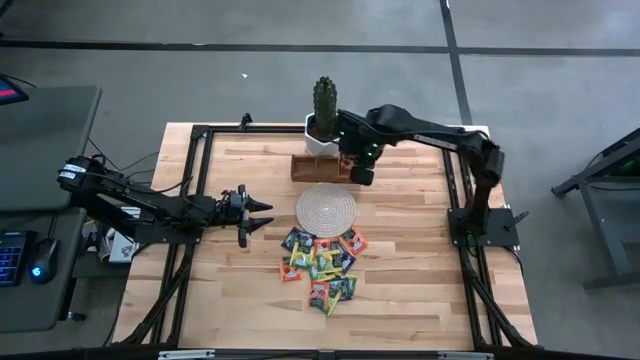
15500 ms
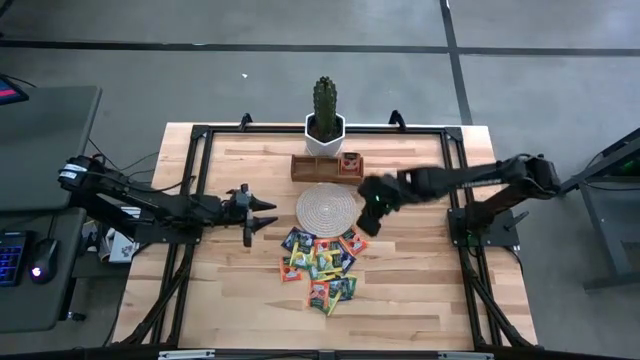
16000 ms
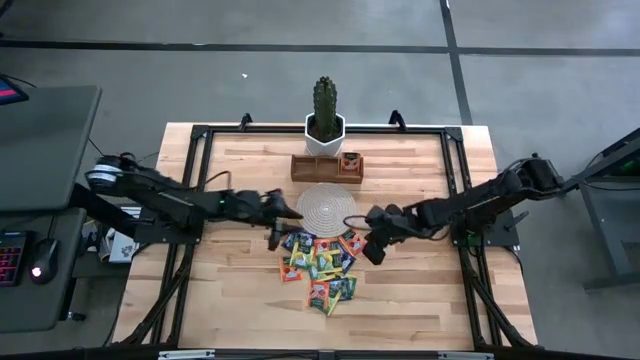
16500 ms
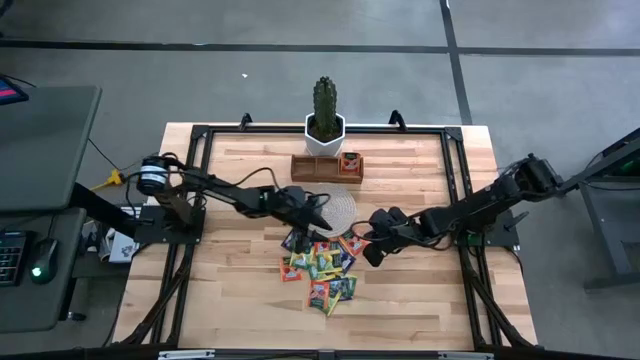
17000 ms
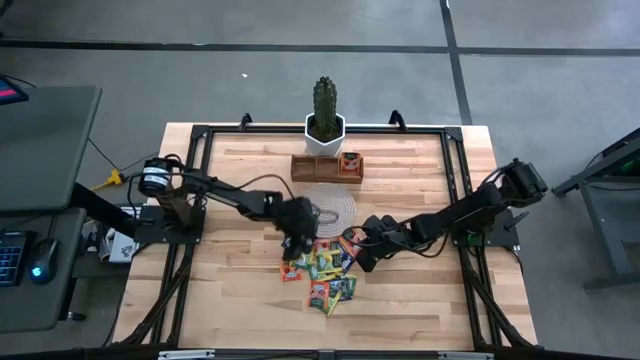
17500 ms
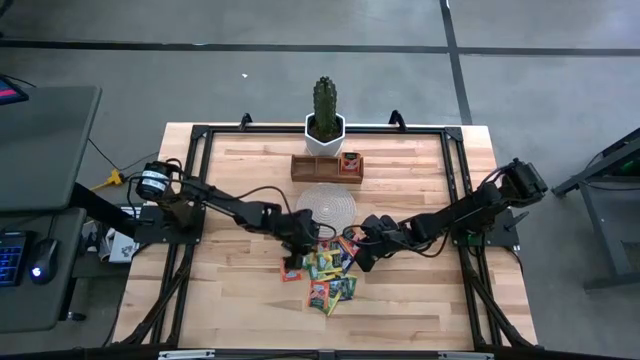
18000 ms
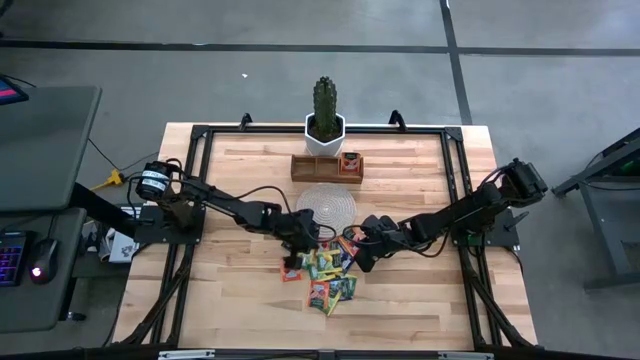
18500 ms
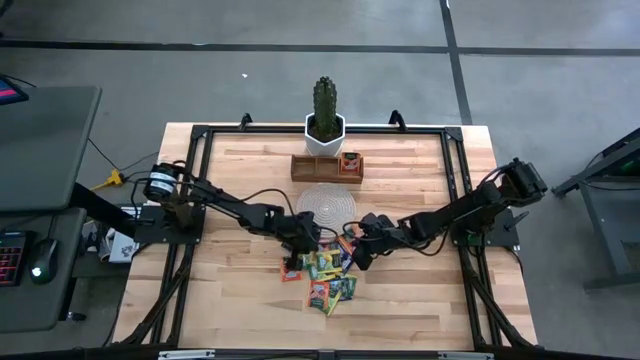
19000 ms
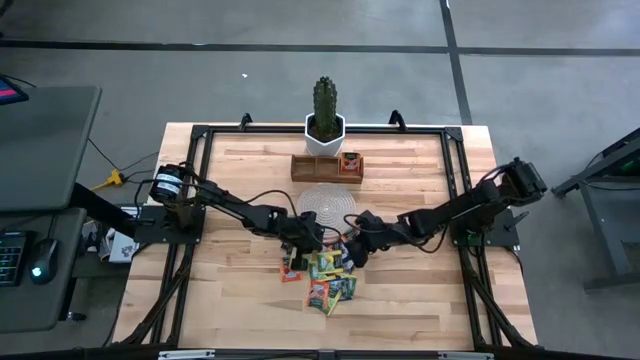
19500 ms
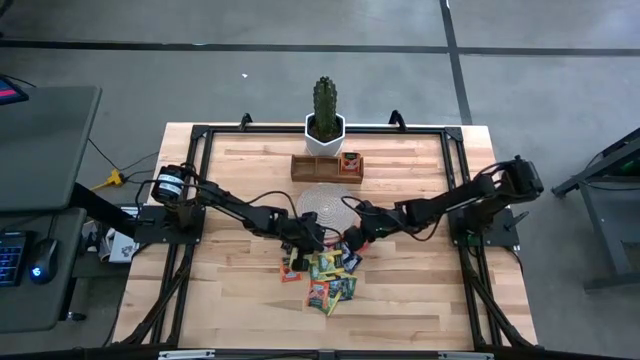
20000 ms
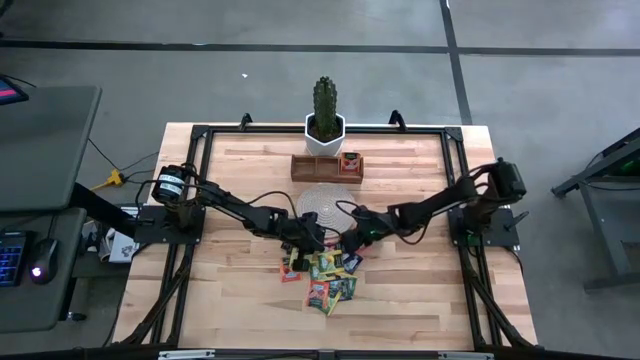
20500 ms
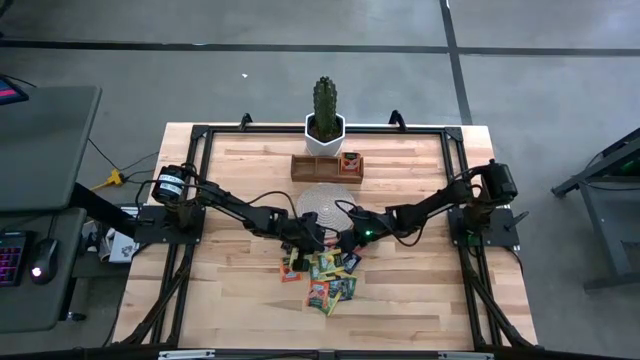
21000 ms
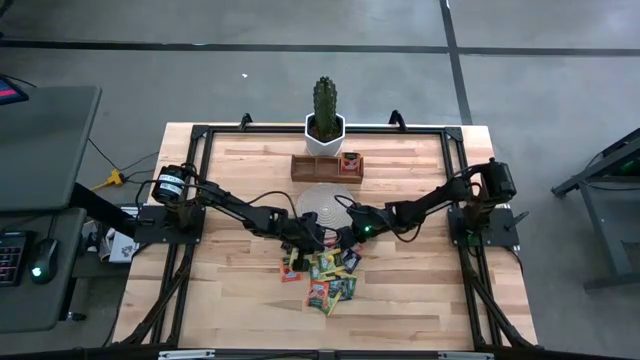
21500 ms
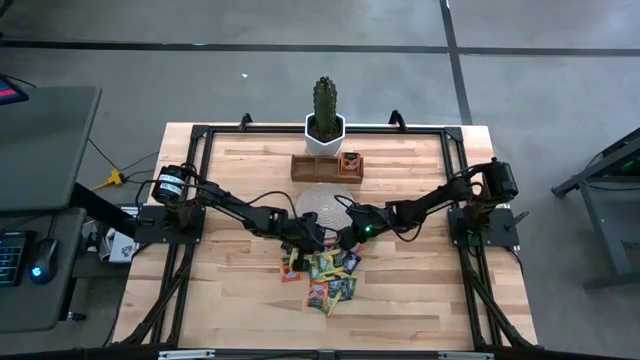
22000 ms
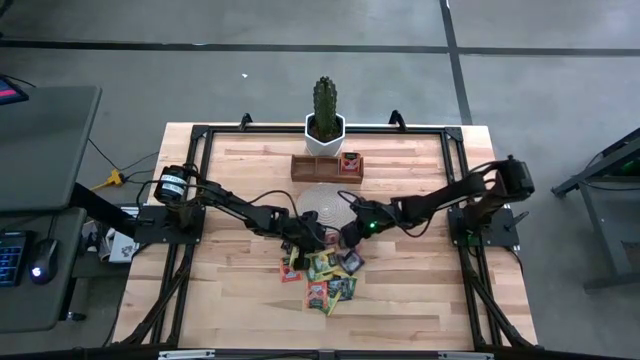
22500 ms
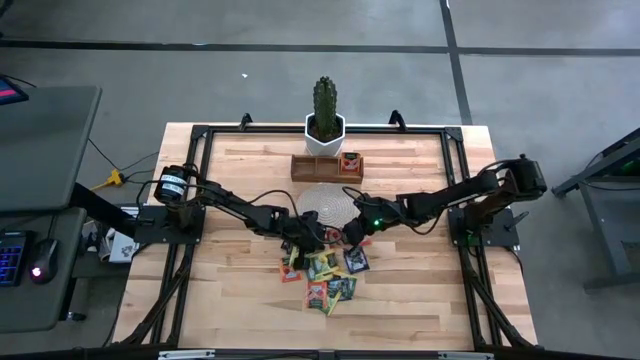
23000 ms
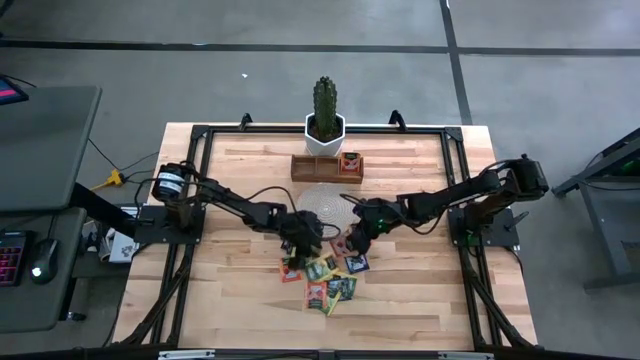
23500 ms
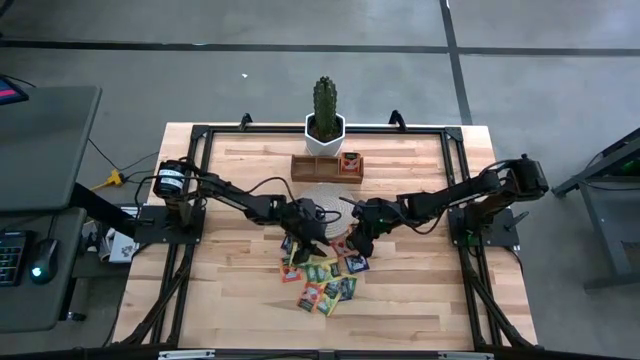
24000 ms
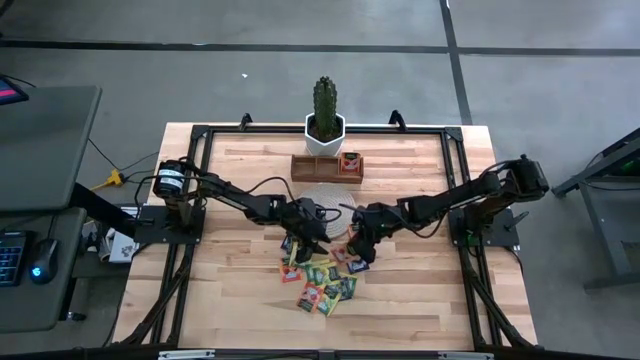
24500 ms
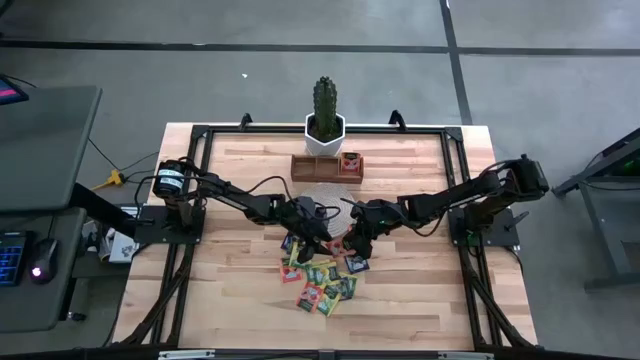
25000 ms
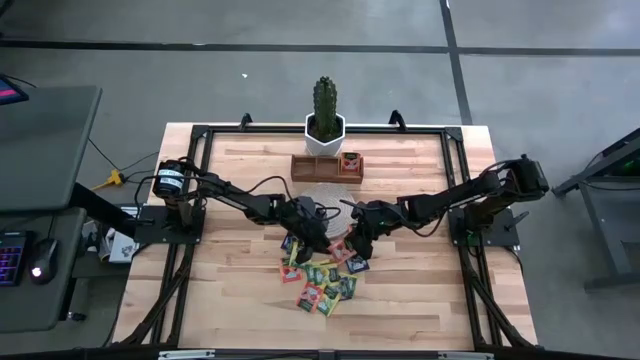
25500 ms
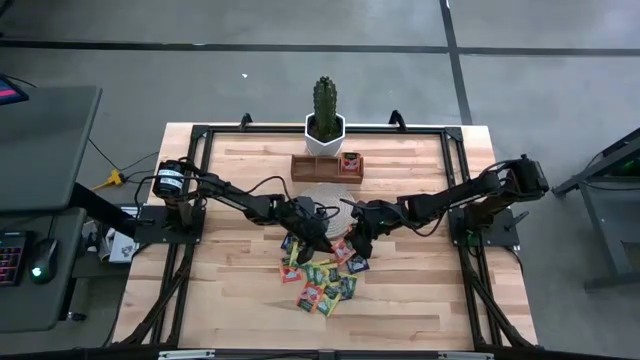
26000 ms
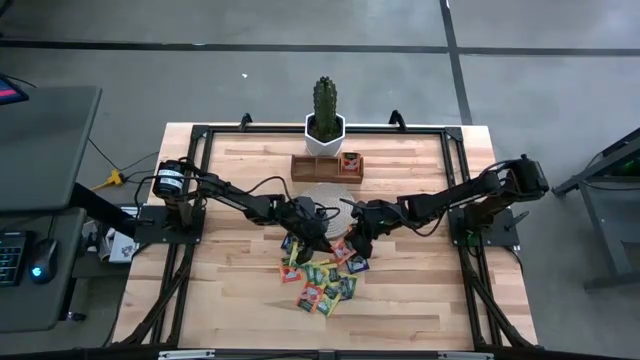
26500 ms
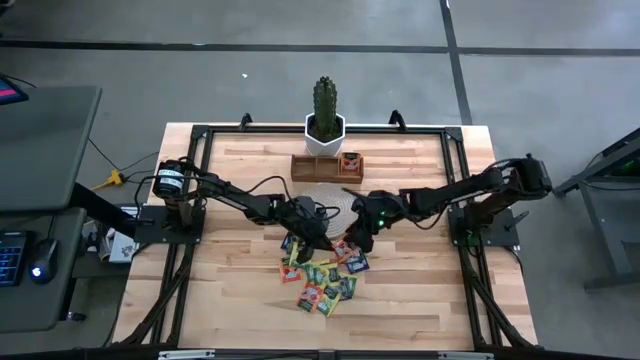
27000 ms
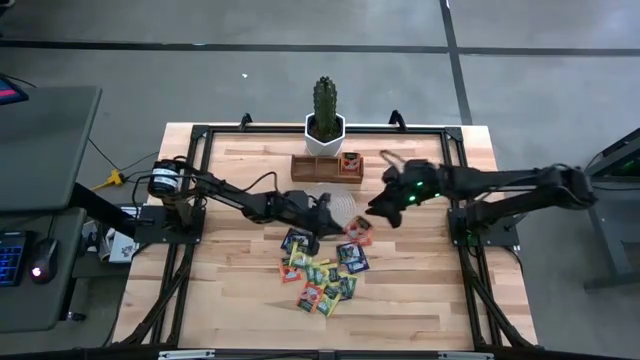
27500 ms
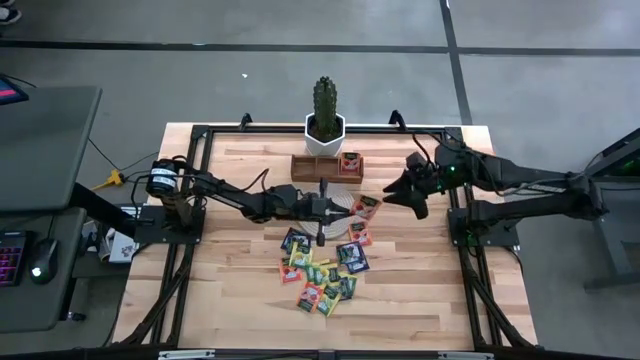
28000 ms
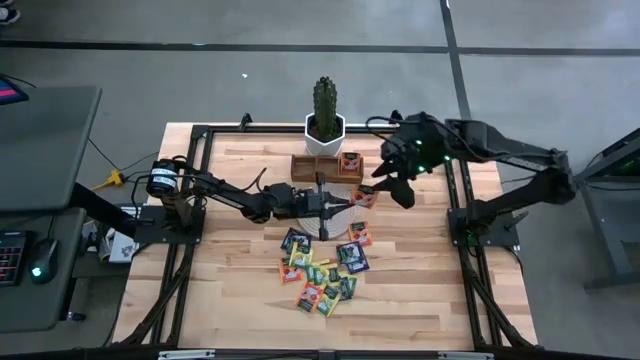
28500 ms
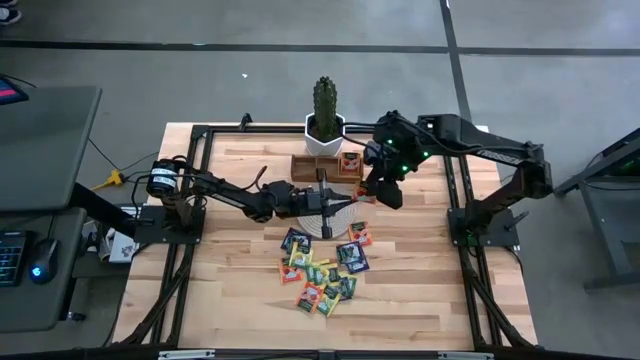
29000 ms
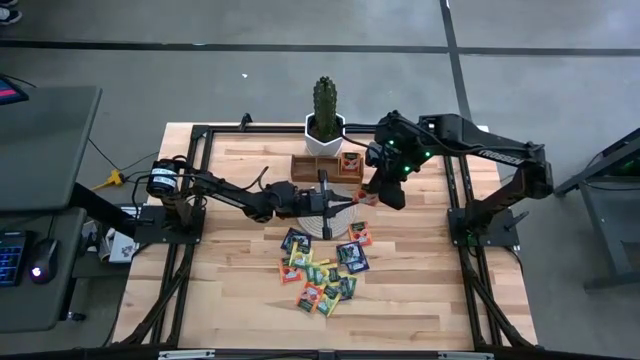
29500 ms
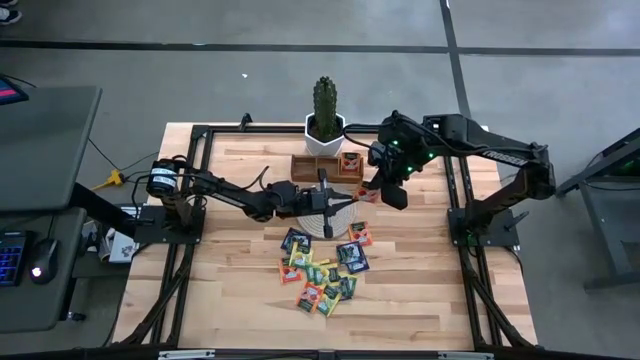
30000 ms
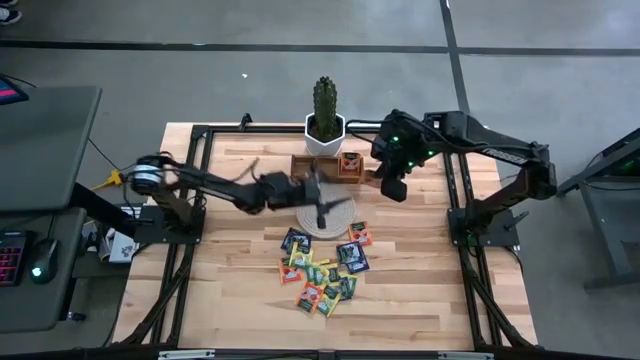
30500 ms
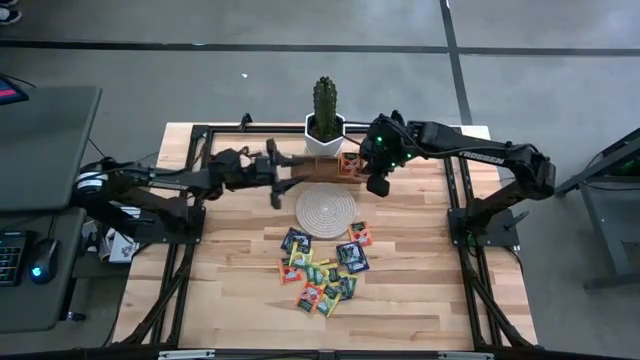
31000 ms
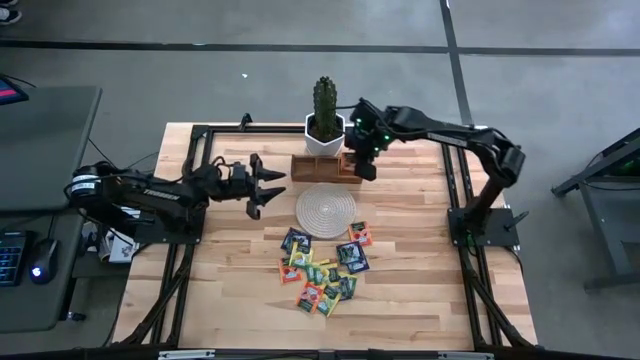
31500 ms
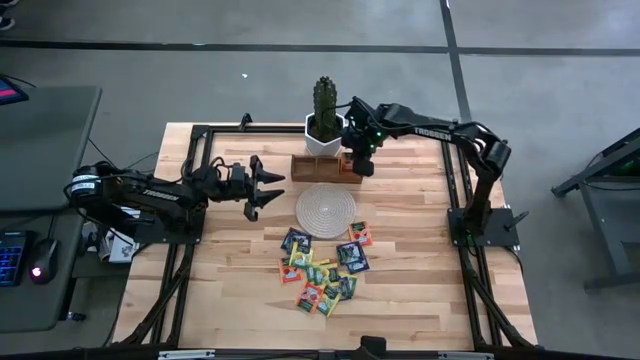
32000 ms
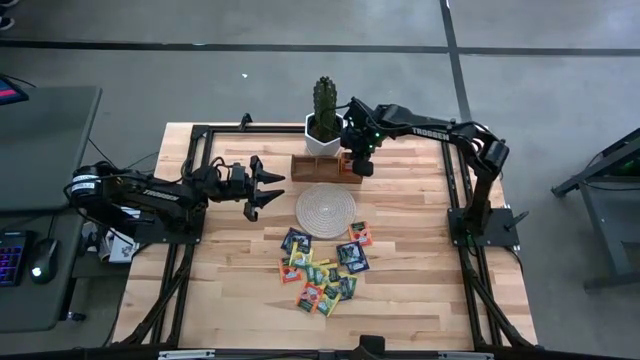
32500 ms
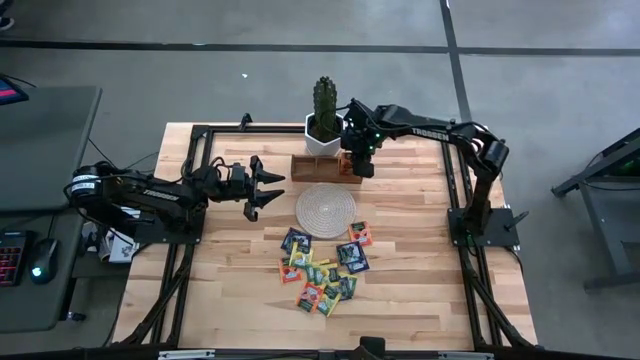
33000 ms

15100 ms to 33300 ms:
Task: Pick & Place Tea
Put the orange tea bag into the right section of the wooden organizer

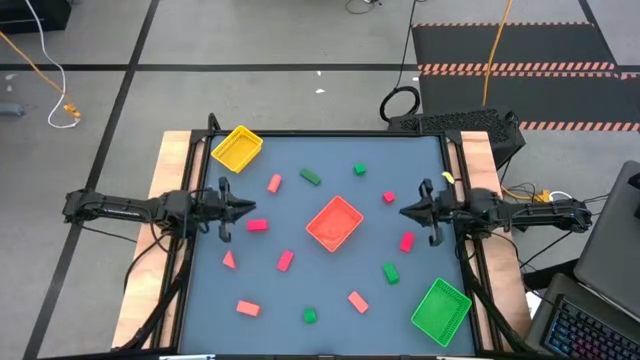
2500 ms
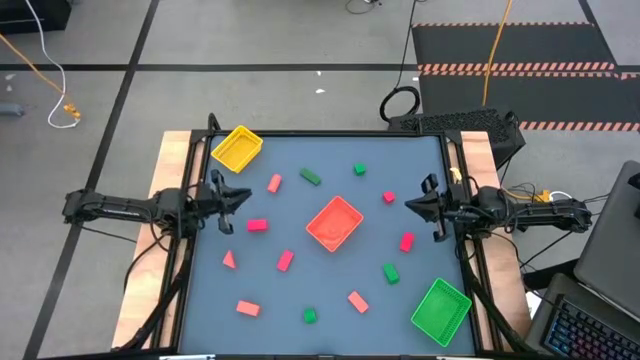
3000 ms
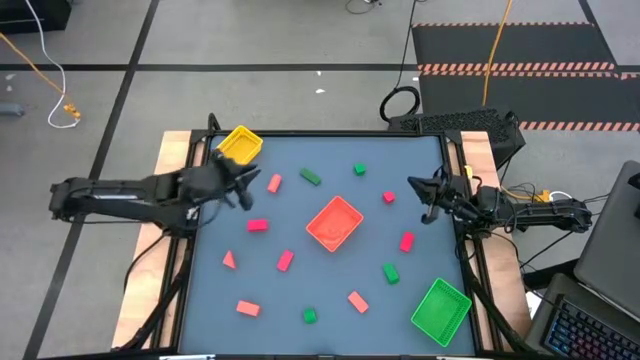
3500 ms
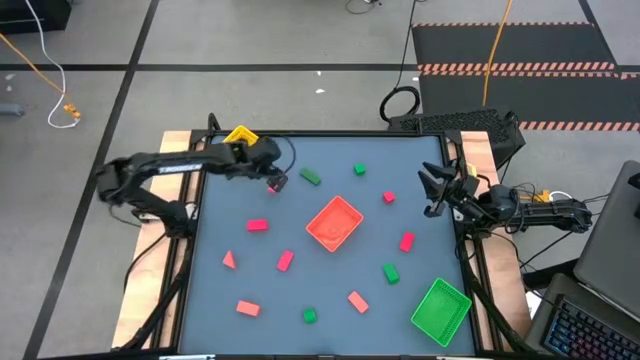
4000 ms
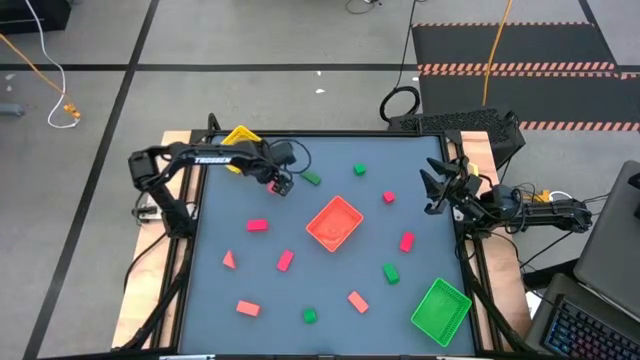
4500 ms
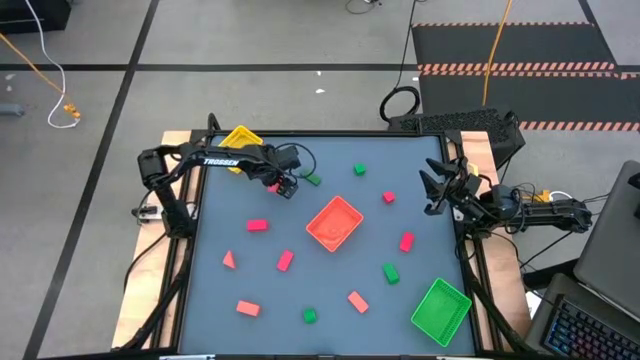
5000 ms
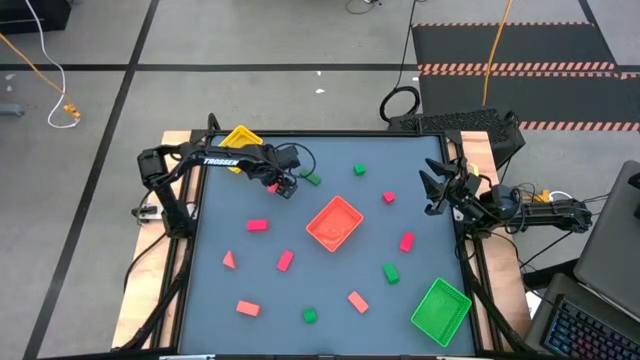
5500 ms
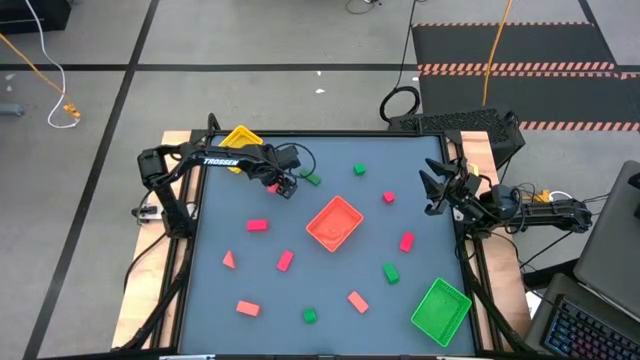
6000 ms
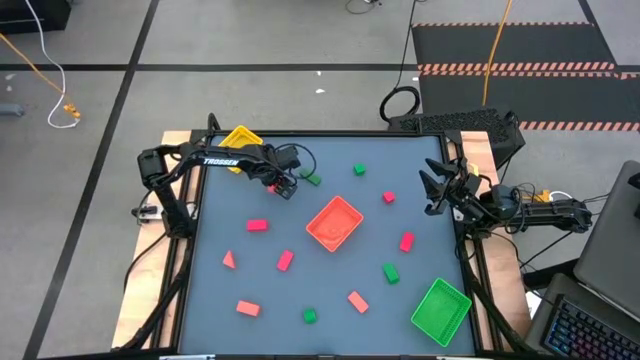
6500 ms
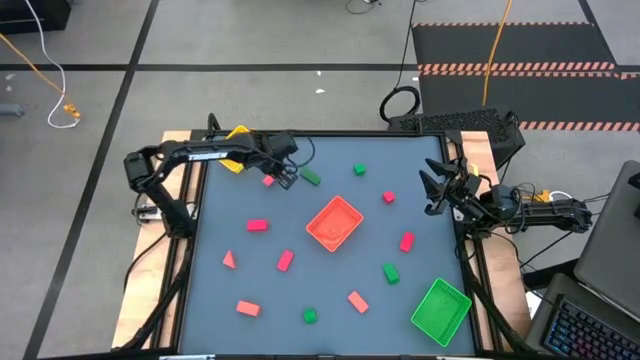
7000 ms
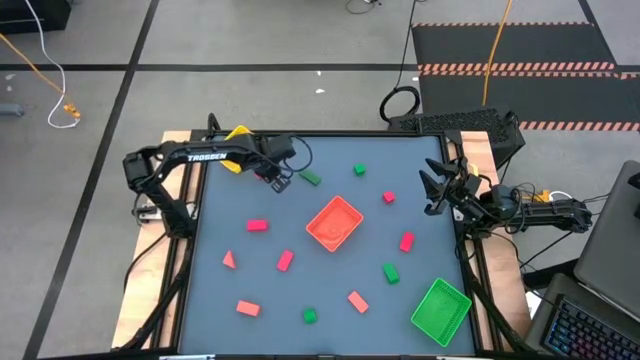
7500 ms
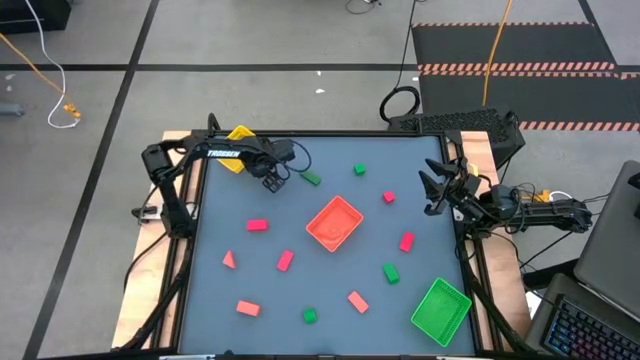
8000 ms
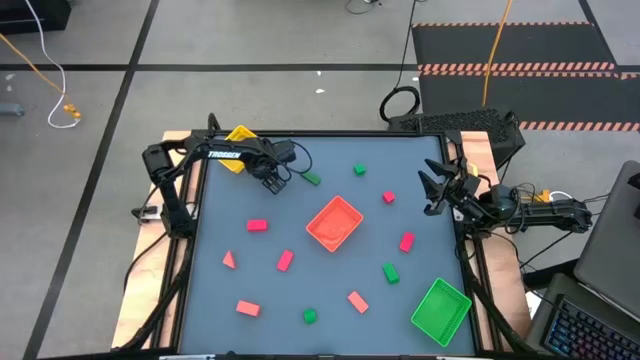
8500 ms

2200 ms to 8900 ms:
Task: Sort & place blocks by color
Put the orange block into the yellow bin
